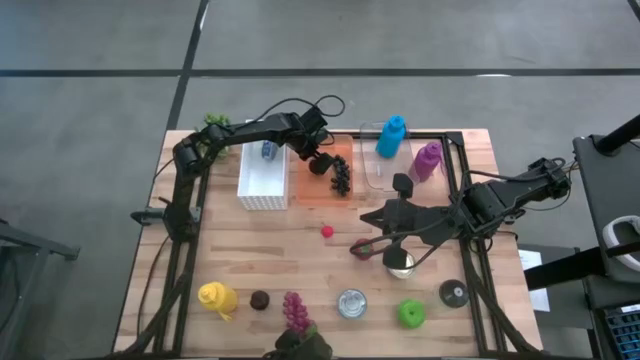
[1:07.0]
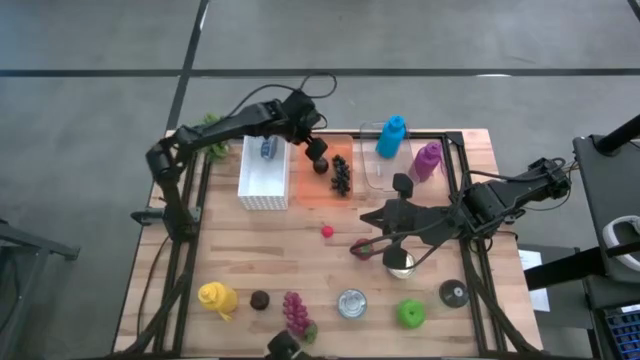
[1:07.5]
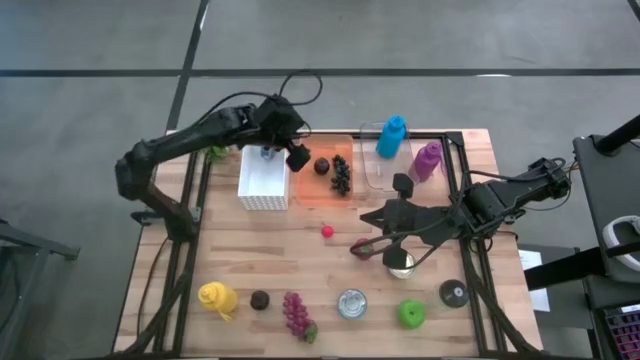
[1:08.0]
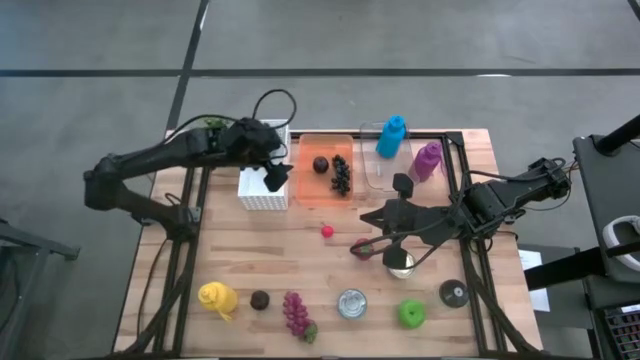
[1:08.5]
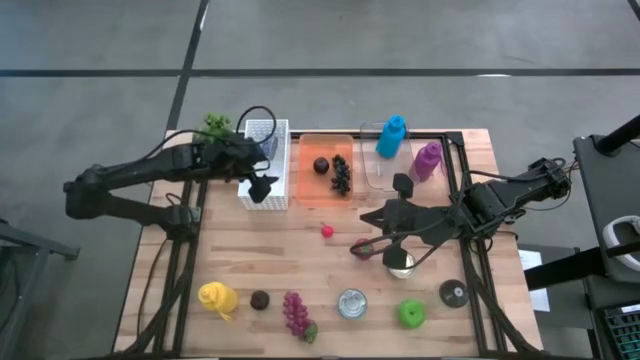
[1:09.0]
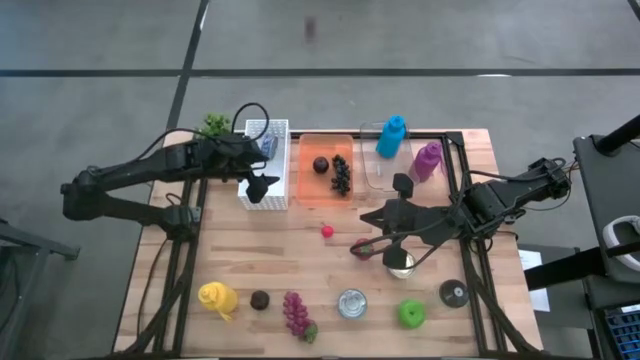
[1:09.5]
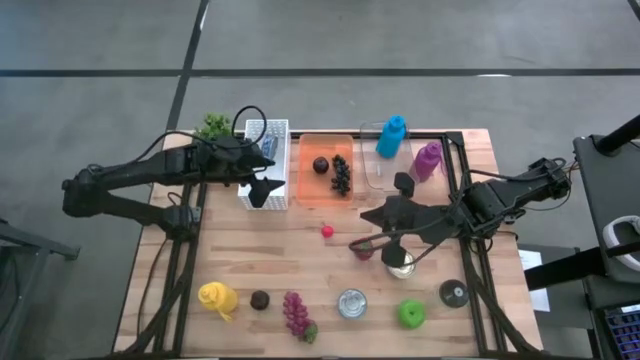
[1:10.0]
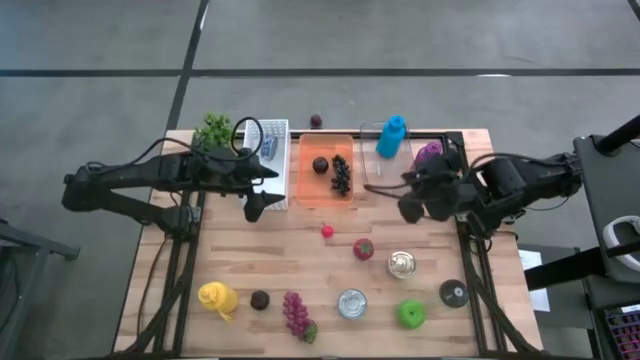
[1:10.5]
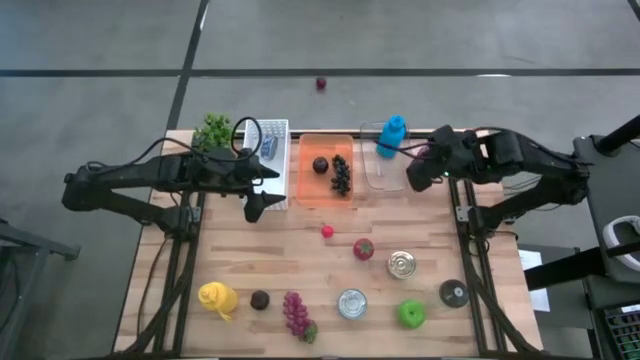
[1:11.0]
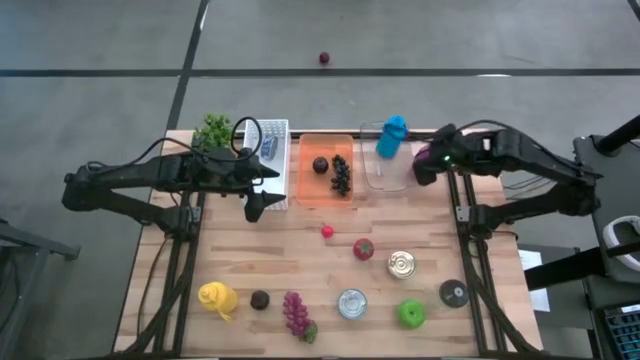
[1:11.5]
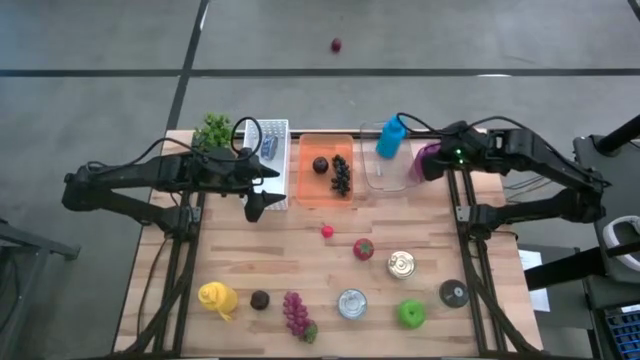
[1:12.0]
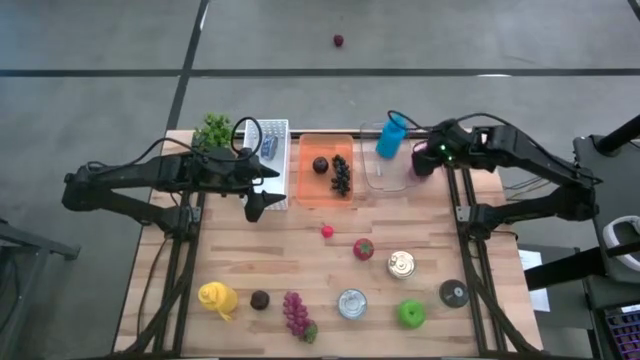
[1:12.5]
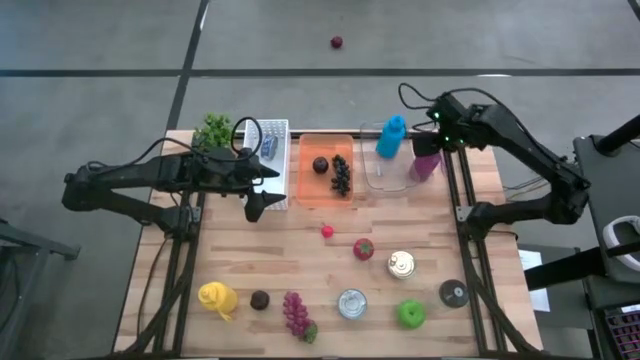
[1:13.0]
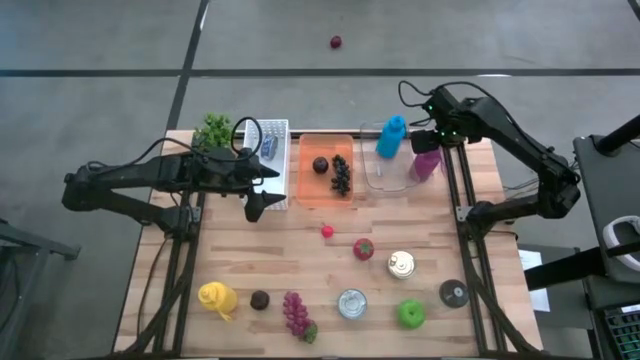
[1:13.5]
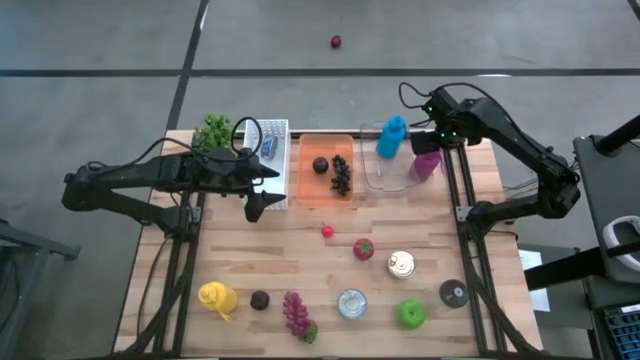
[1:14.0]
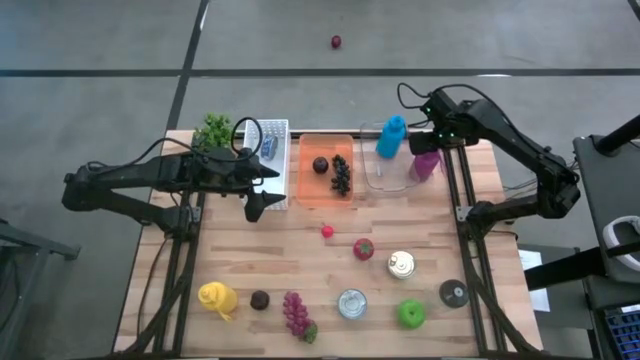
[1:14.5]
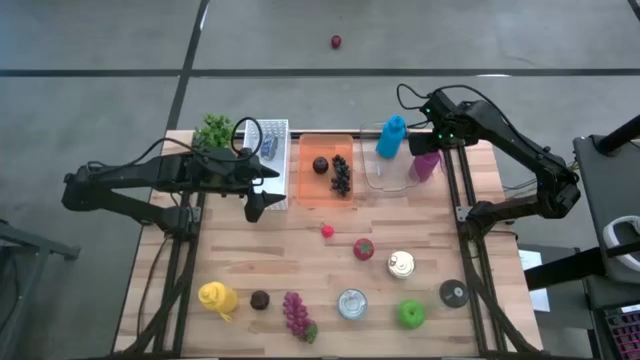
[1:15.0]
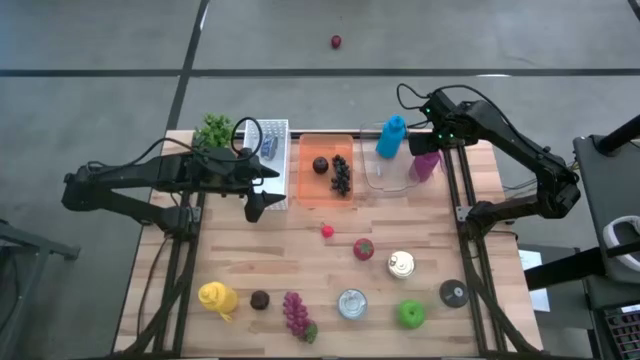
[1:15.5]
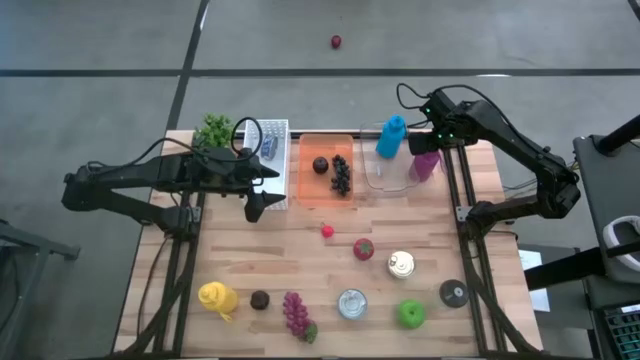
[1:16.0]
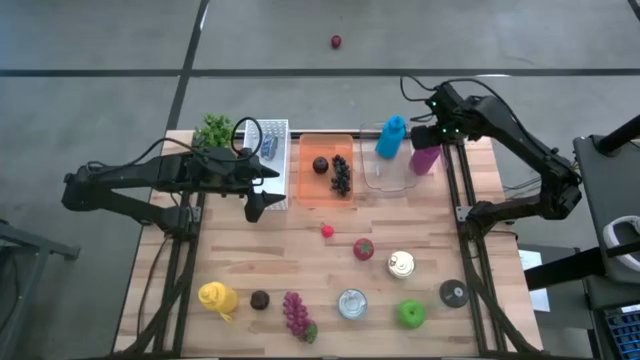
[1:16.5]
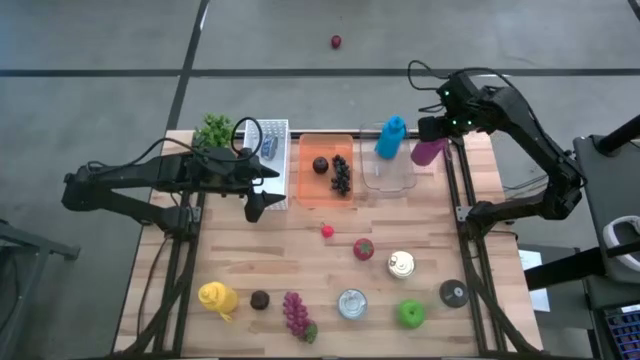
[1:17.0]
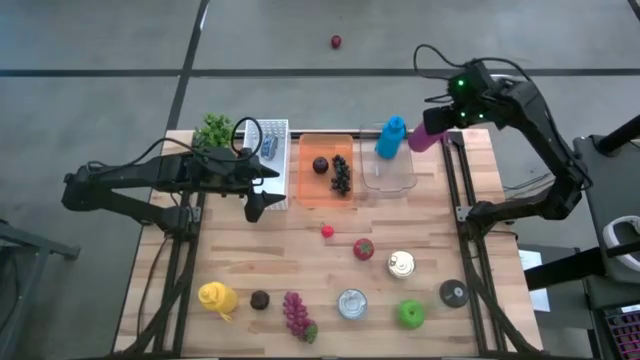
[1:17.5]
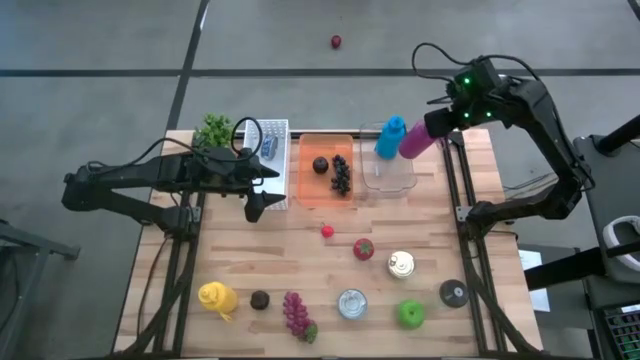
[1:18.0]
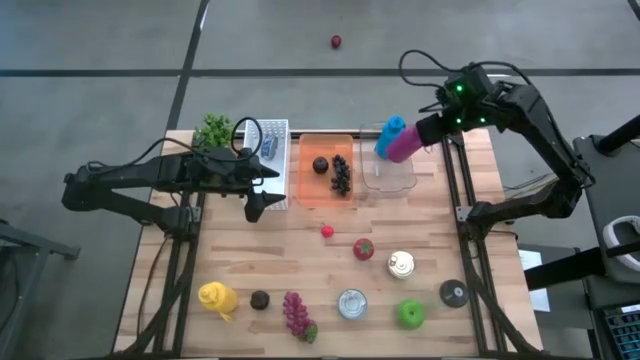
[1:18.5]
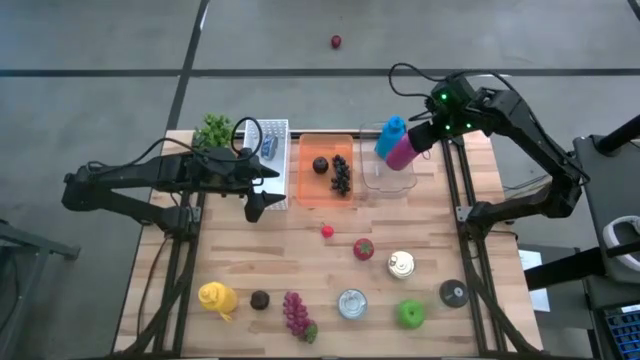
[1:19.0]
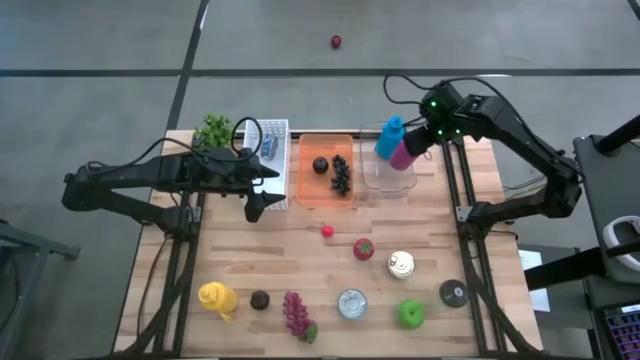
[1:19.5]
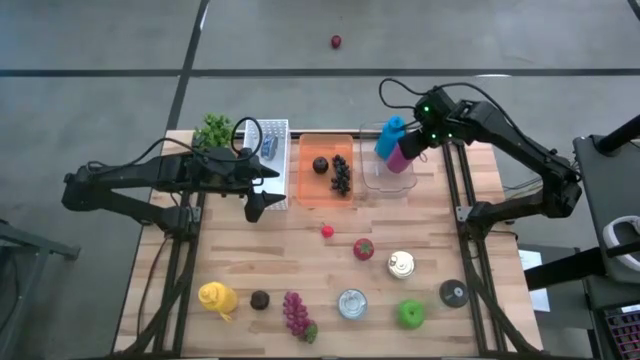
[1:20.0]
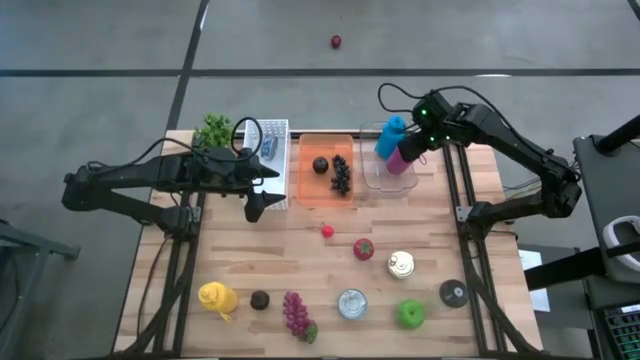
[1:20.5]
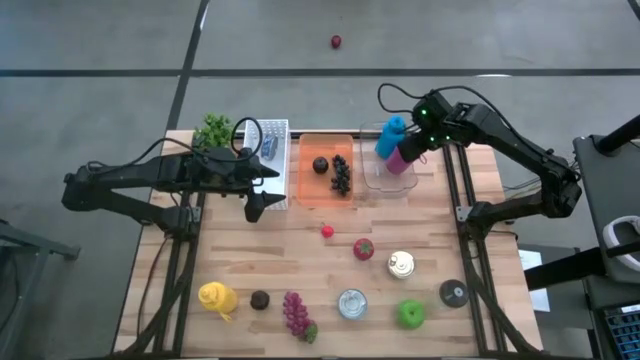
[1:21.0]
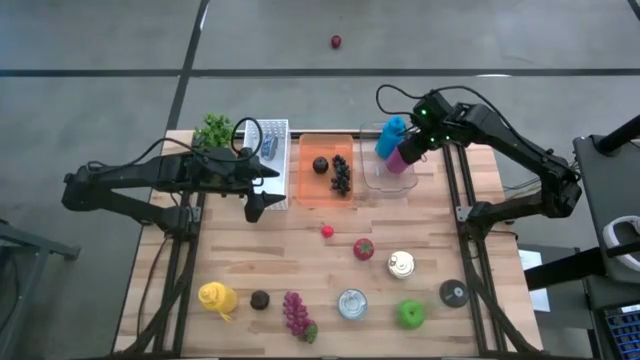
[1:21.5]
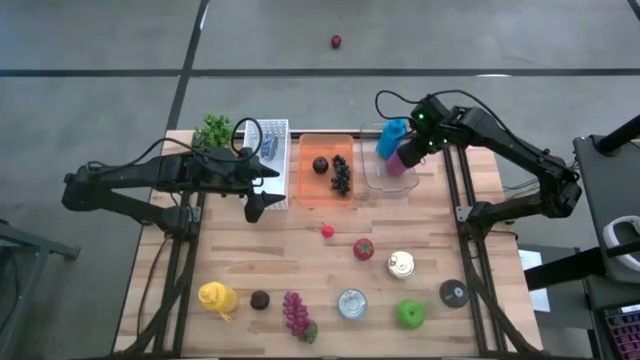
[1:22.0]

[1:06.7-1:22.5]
Task: Pick & Place Food Item
Put the purple tumbler into the transparent bin

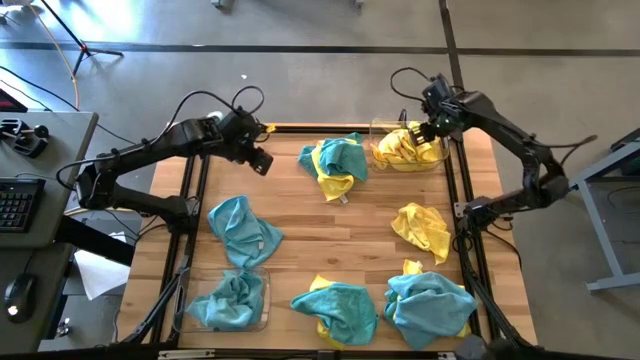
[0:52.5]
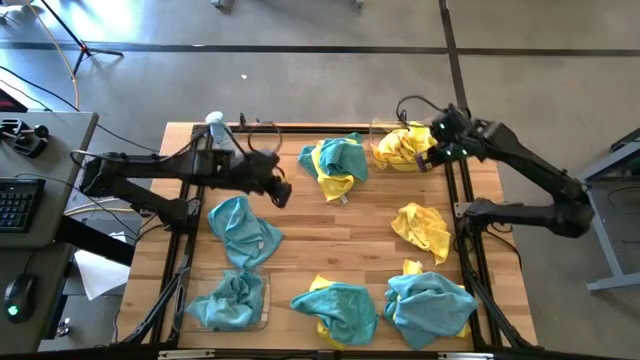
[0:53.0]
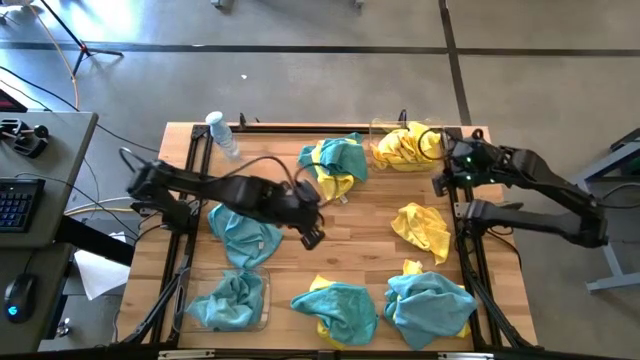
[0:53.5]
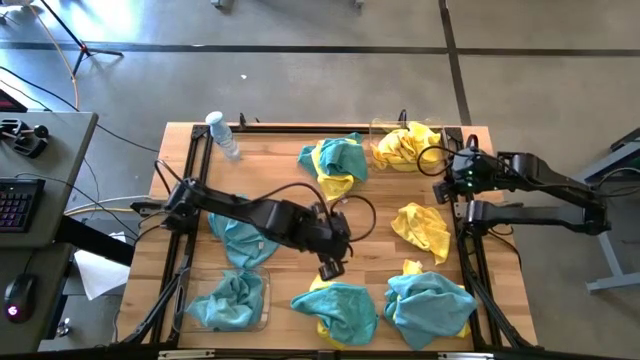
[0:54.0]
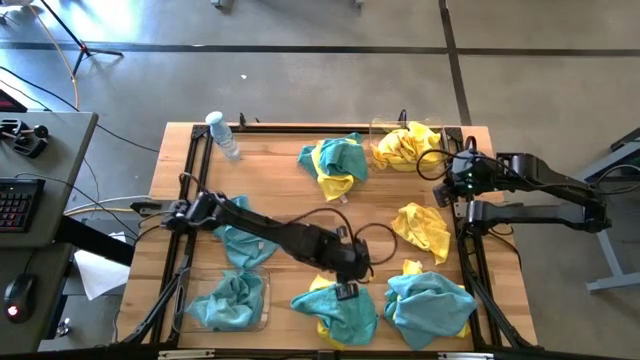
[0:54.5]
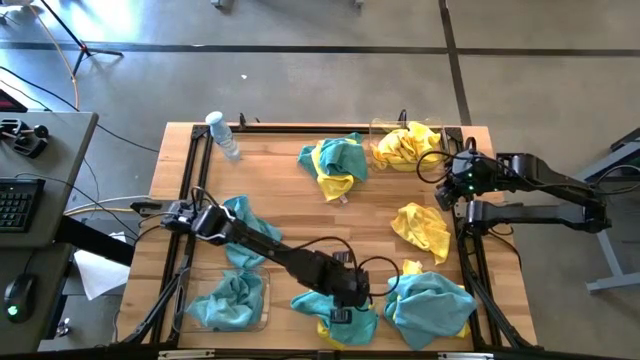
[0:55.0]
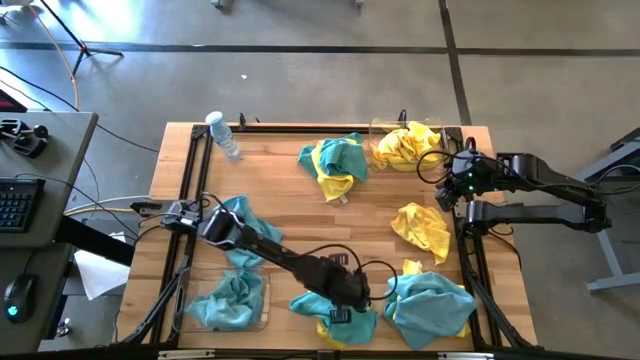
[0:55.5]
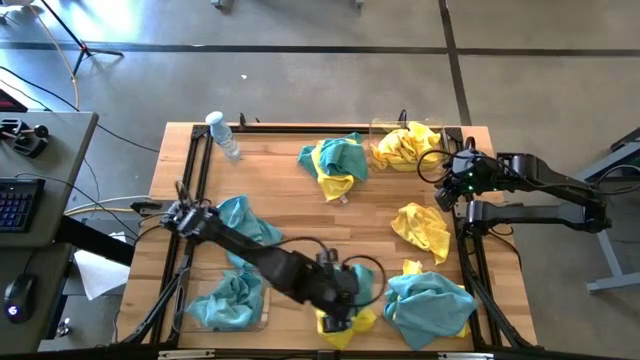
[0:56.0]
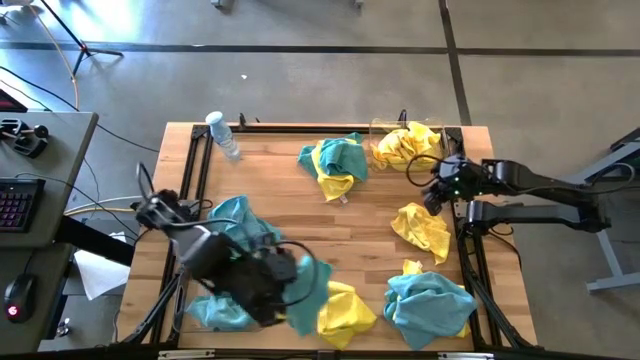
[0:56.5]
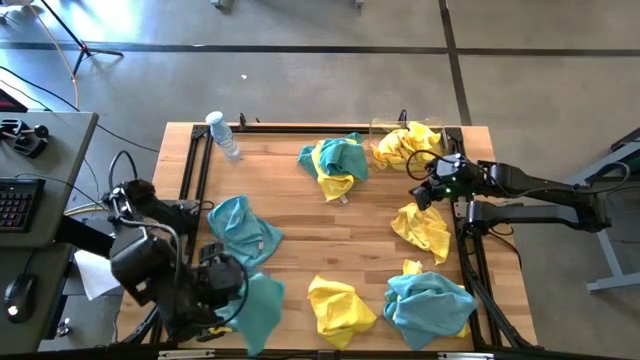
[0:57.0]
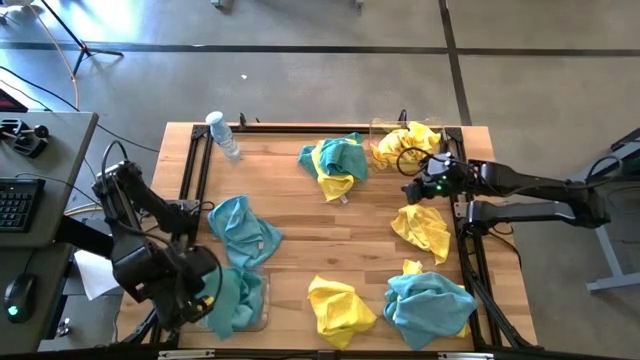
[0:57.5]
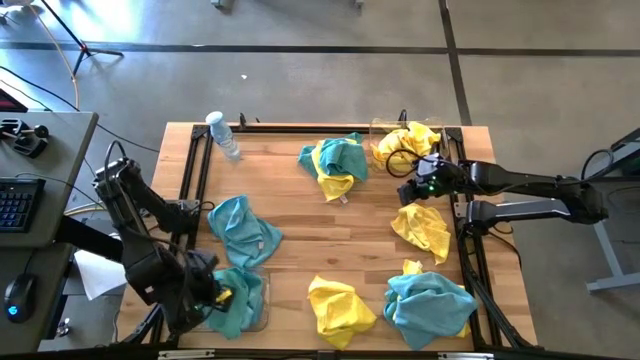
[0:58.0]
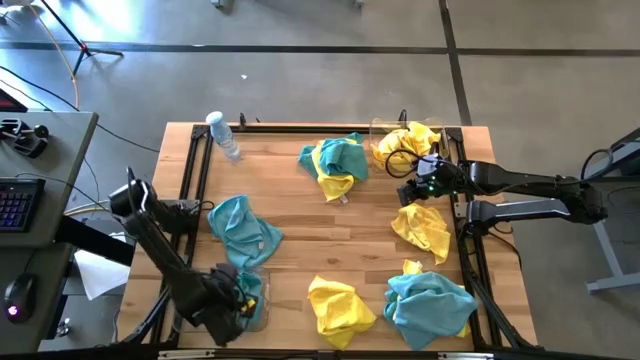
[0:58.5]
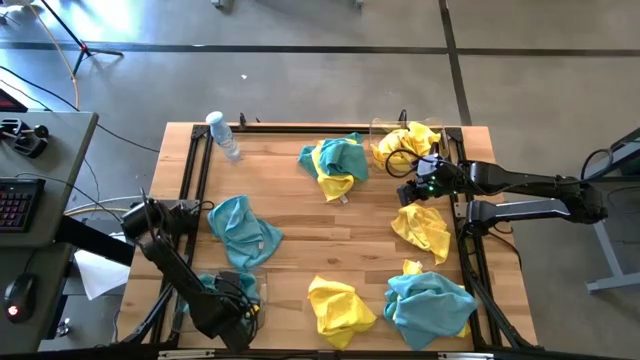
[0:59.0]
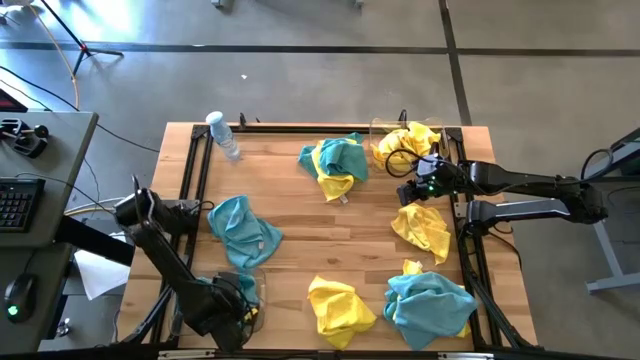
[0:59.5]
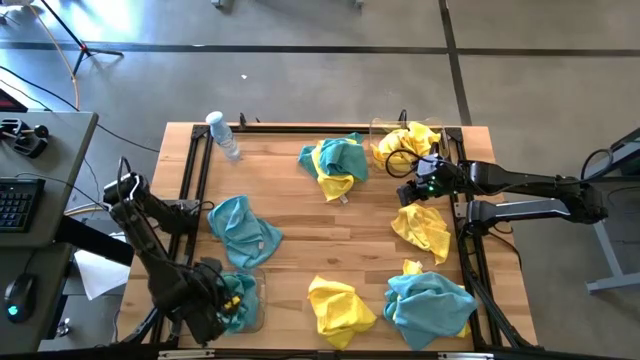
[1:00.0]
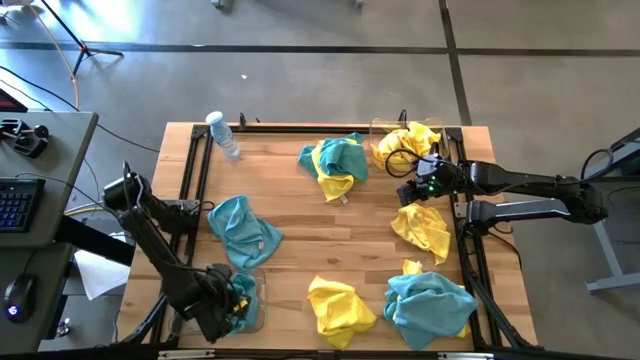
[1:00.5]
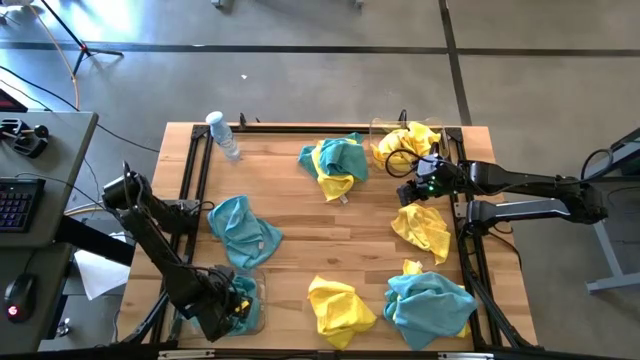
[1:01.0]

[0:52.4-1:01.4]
Task: Sort microfiber towel by color & place in baskets
Put the blue microfiber towel into the bottom transparent bin
